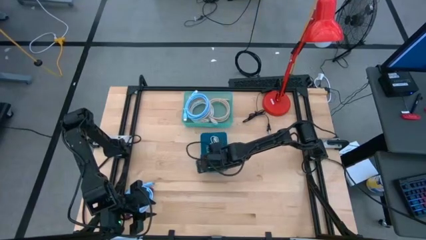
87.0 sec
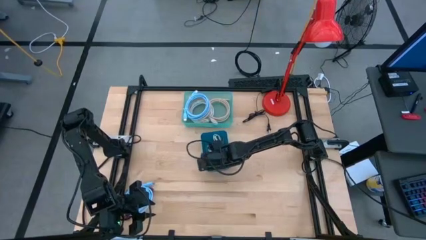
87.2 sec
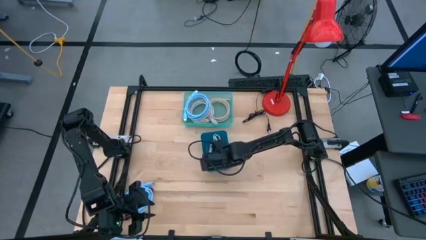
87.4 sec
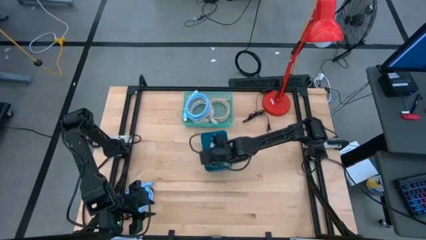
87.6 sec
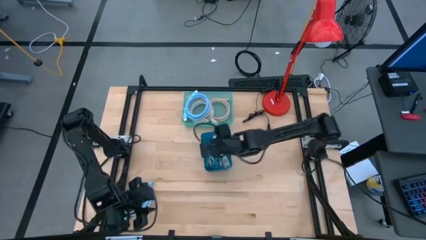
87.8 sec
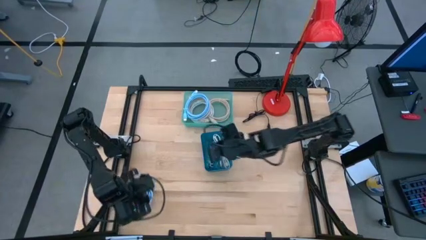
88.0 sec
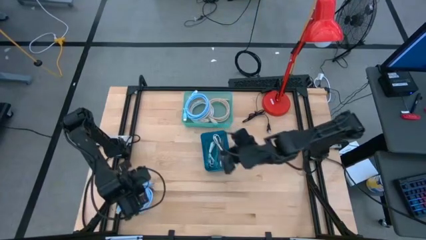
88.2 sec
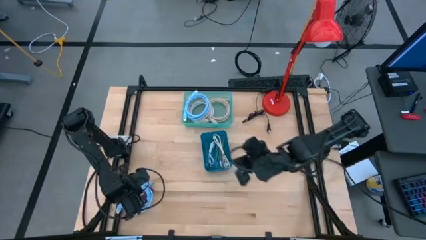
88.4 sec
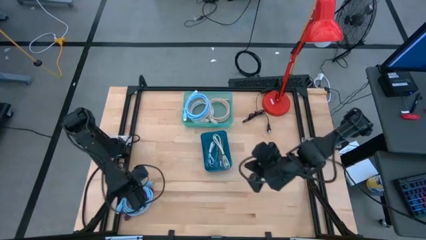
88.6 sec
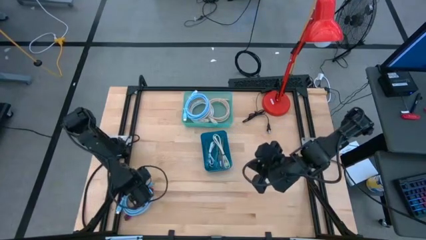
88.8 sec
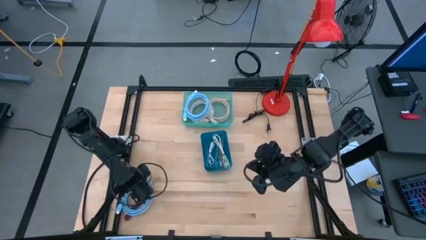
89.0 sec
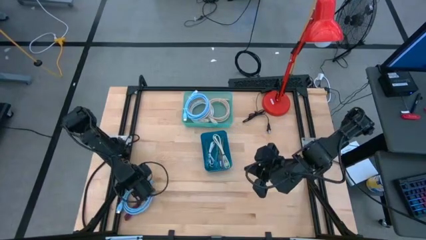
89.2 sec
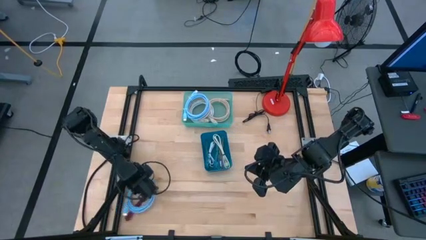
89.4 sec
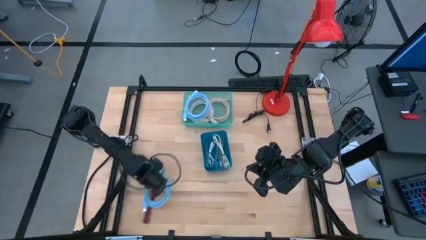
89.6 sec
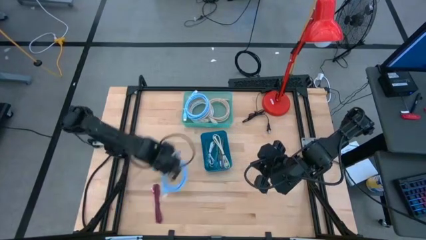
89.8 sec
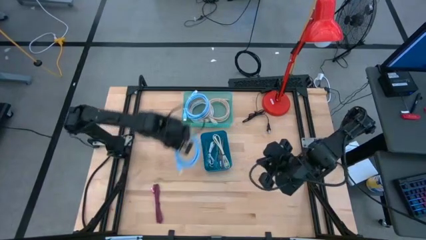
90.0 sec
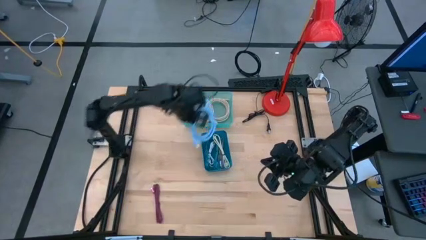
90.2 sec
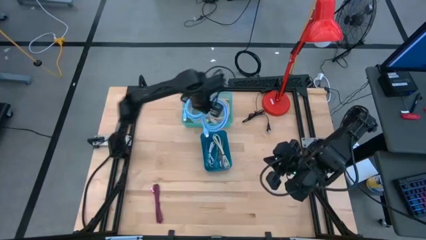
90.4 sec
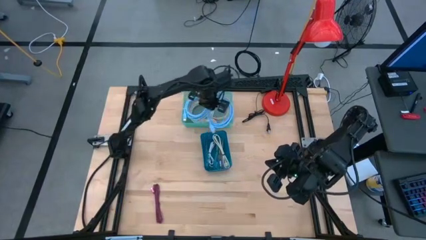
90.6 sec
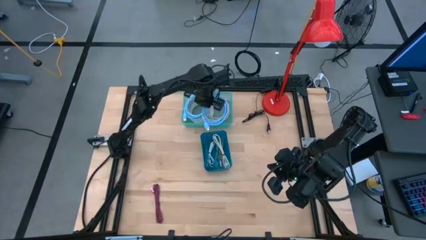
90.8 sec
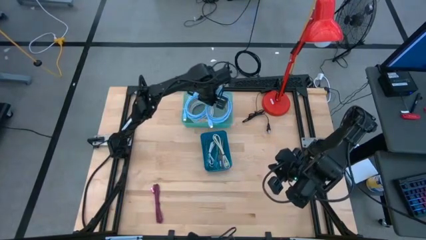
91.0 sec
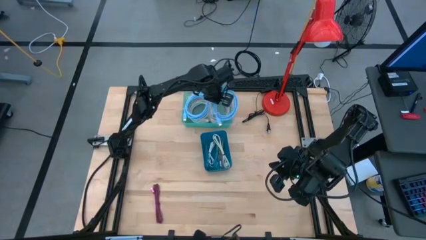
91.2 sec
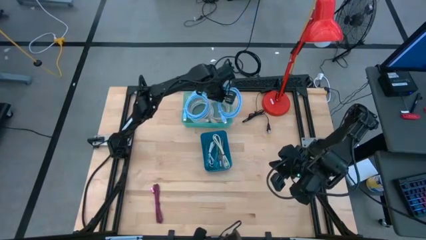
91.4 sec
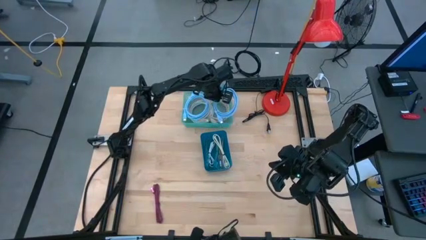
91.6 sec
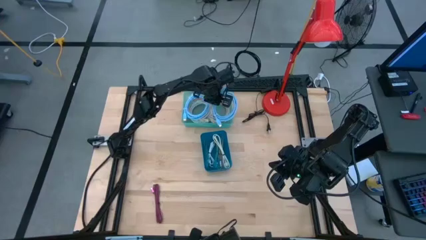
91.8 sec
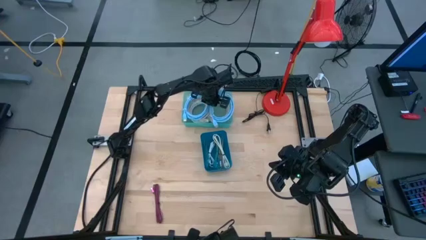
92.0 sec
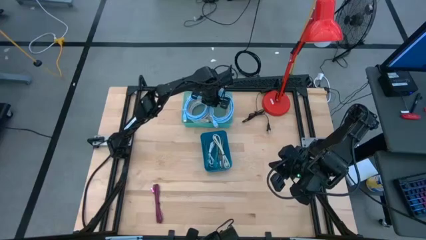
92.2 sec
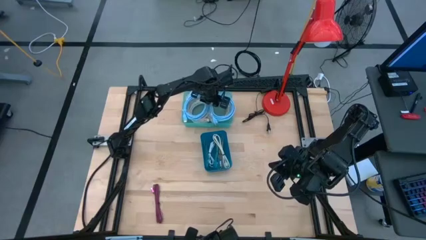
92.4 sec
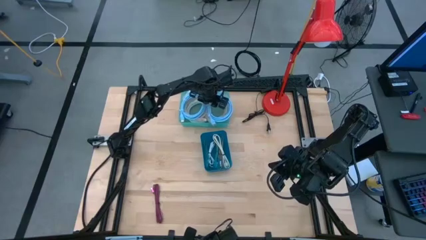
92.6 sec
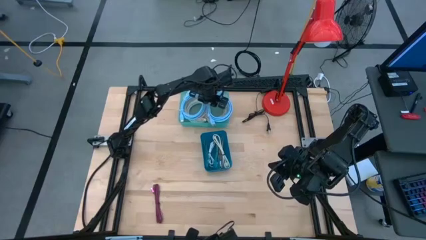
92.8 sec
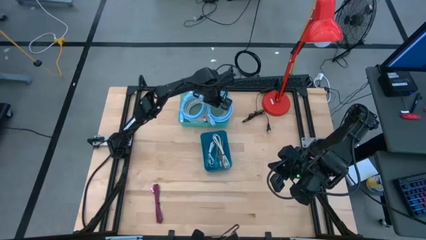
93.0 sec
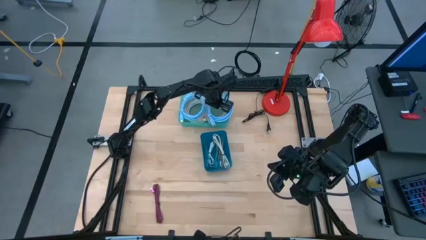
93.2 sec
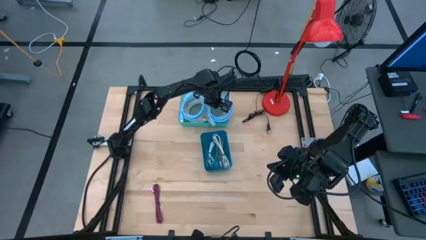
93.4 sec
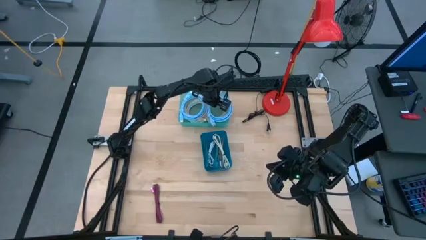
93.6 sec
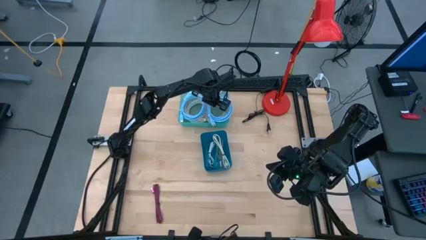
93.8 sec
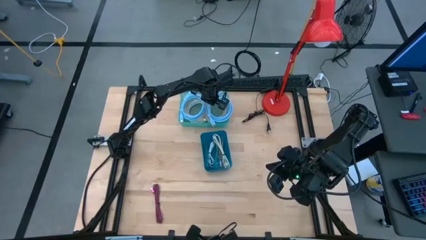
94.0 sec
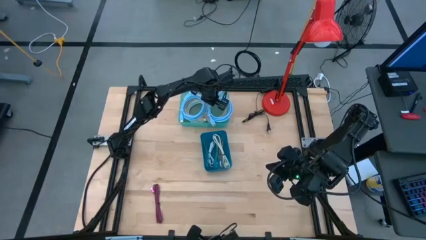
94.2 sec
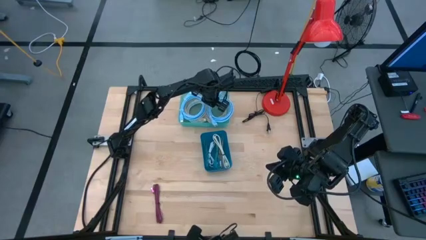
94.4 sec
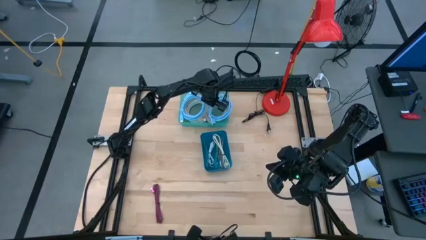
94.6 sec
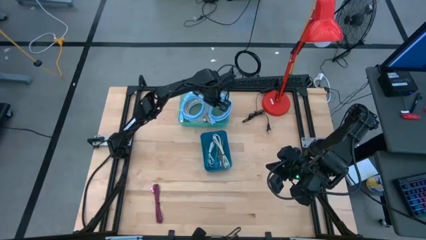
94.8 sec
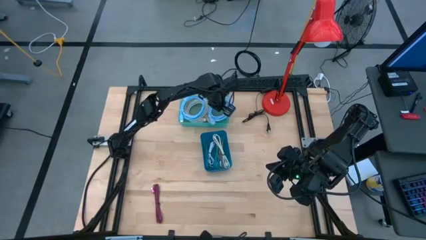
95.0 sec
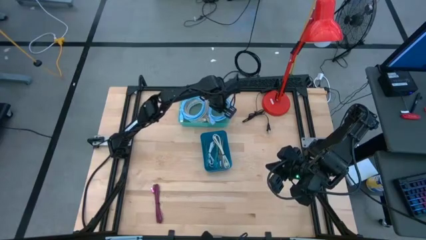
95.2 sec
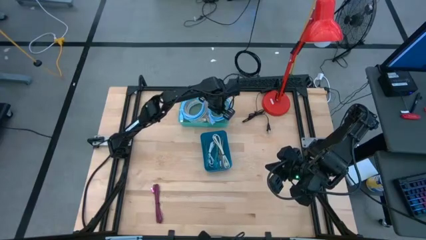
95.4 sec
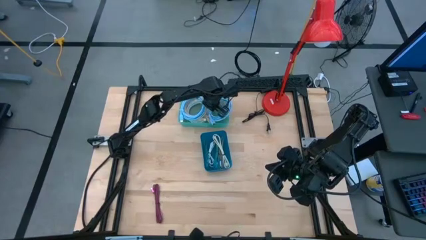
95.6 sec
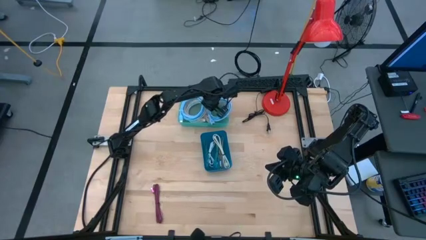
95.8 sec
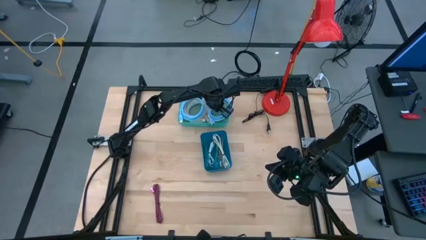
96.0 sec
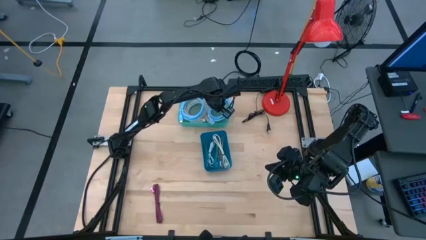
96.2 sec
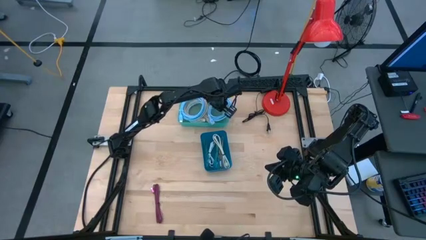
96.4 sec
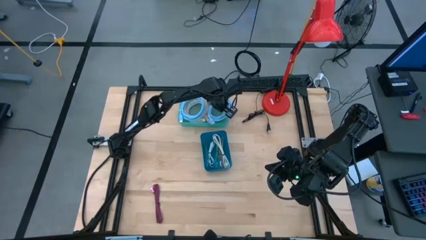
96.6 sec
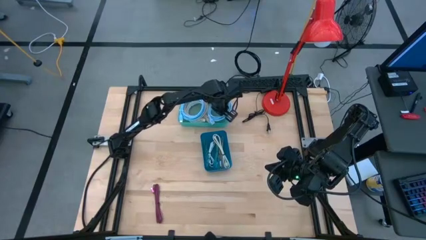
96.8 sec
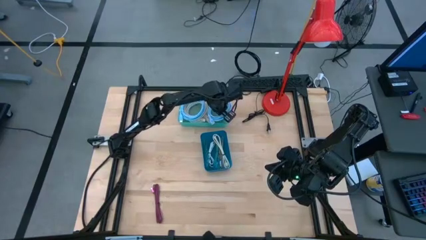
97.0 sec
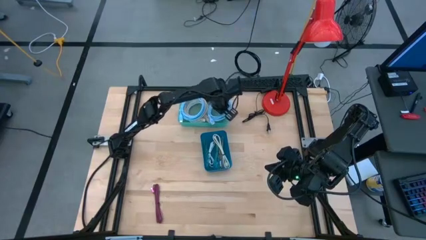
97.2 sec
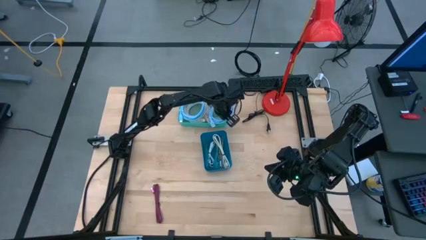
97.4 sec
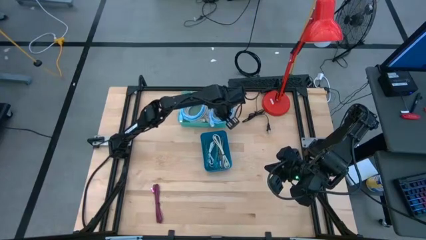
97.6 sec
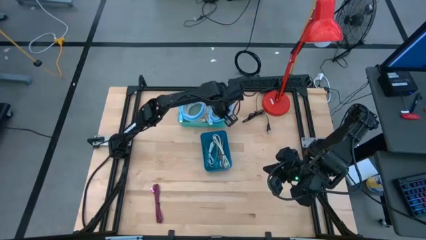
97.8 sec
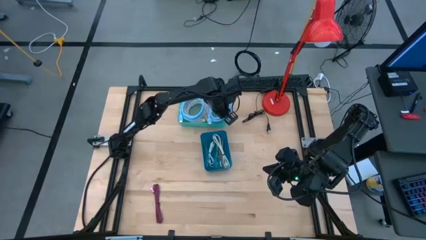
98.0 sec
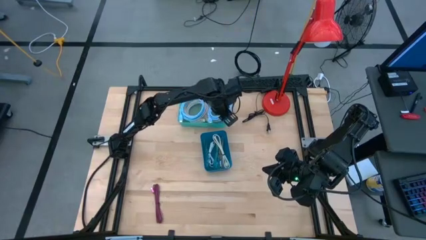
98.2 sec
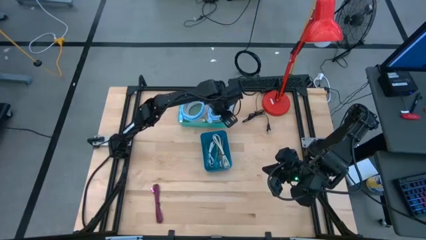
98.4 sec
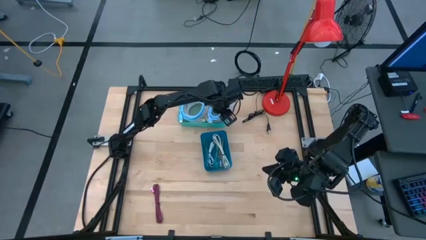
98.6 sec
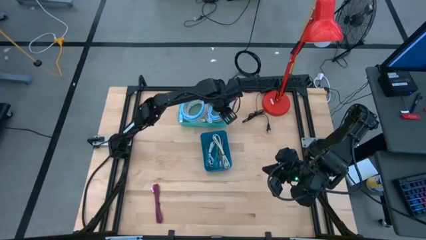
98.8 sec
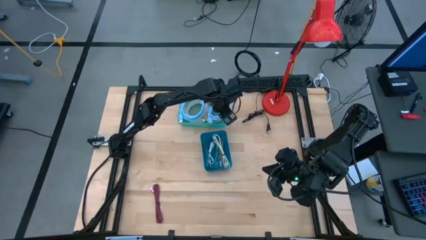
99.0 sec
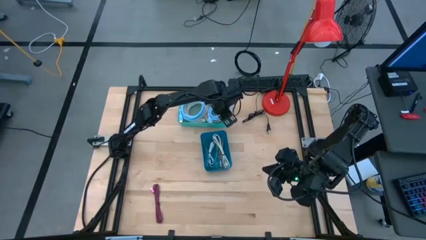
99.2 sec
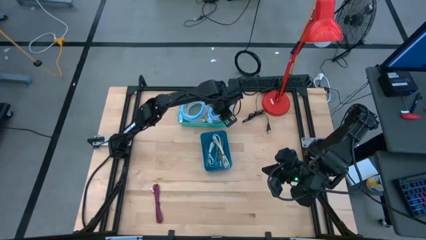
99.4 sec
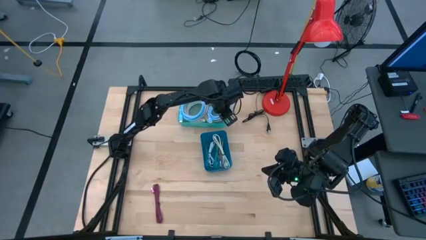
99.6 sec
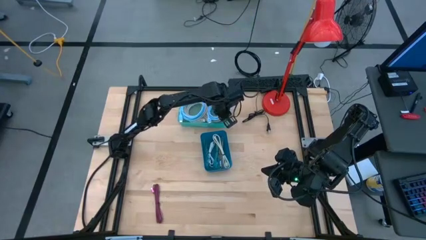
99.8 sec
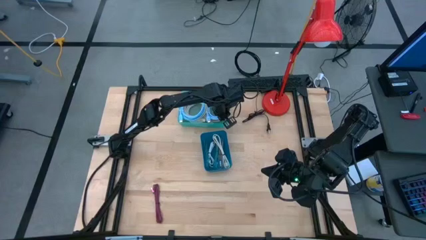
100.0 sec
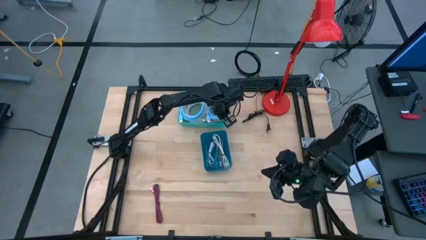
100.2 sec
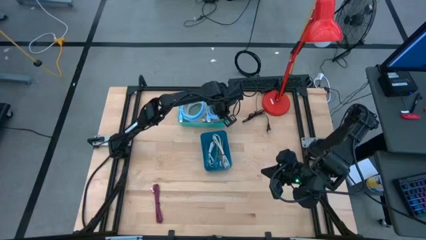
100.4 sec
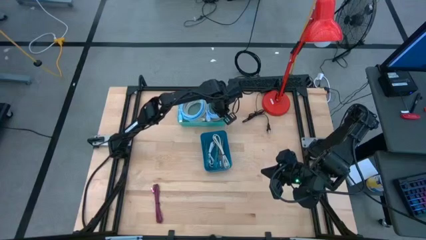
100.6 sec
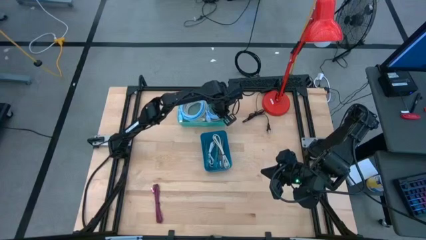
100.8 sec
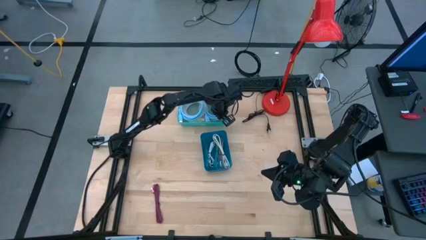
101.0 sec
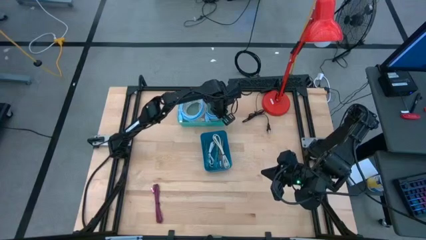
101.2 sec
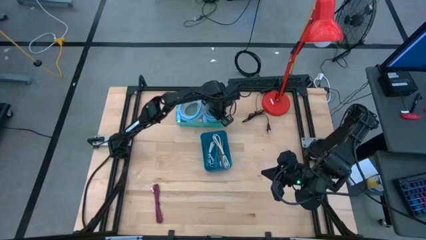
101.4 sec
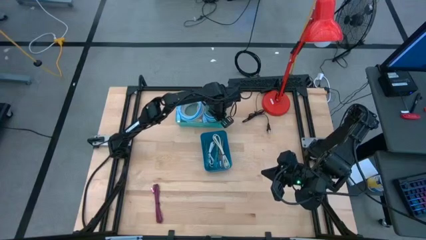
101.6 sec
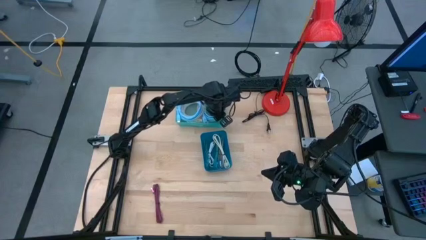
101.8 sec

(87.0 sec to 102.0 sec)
Task: Pick & Place USB Port
Put the light blue HDMI cable into the green bin
